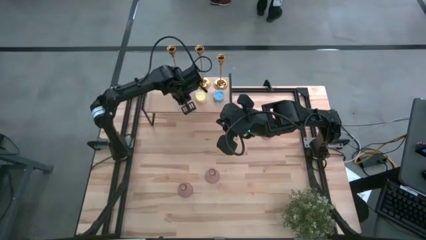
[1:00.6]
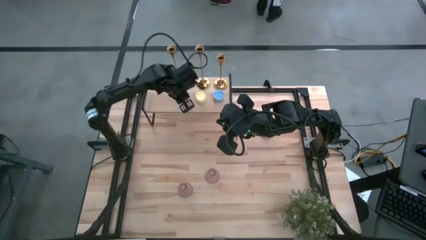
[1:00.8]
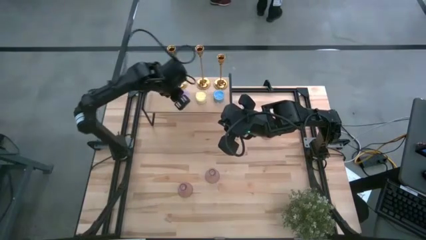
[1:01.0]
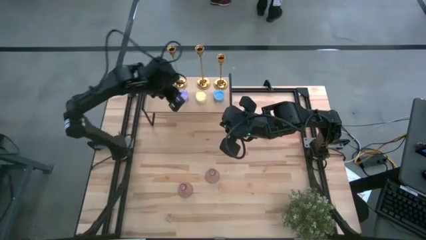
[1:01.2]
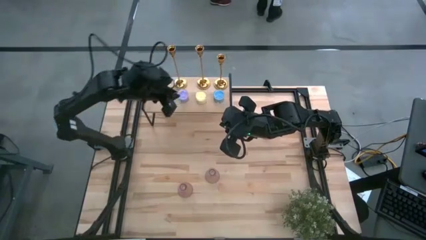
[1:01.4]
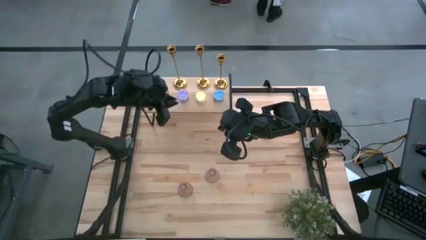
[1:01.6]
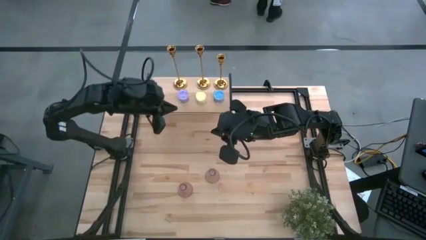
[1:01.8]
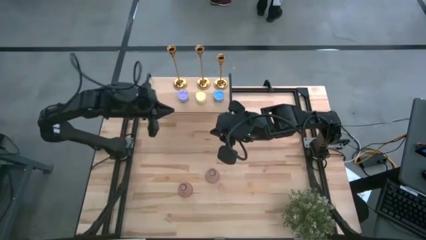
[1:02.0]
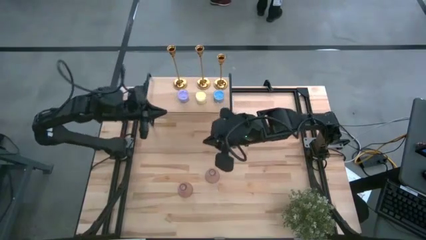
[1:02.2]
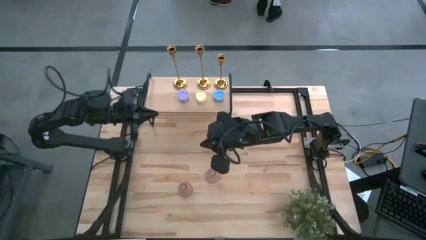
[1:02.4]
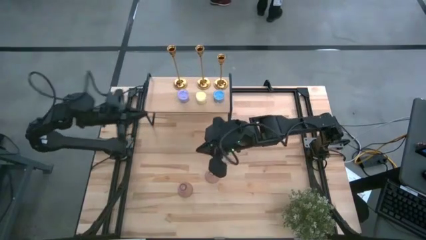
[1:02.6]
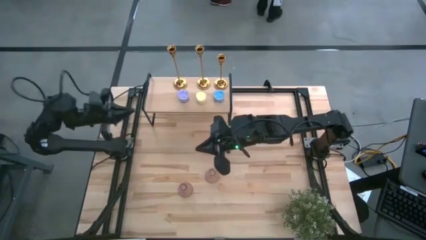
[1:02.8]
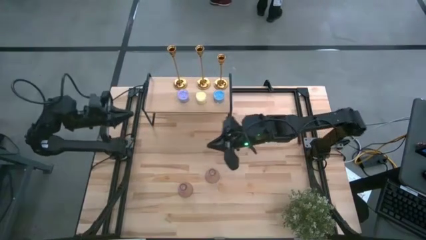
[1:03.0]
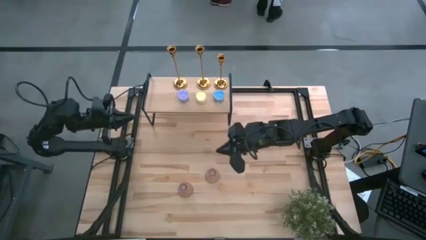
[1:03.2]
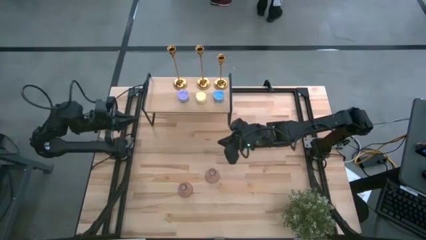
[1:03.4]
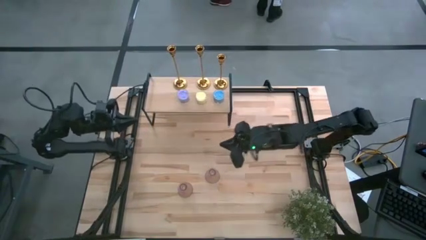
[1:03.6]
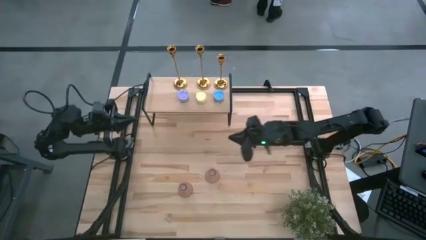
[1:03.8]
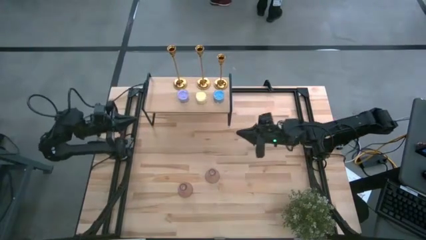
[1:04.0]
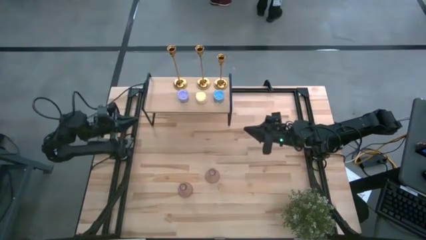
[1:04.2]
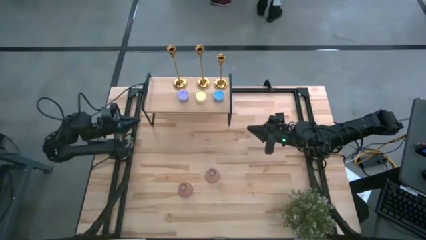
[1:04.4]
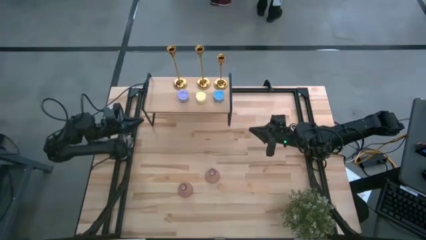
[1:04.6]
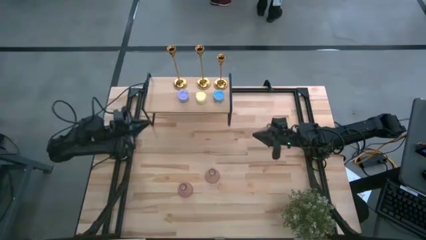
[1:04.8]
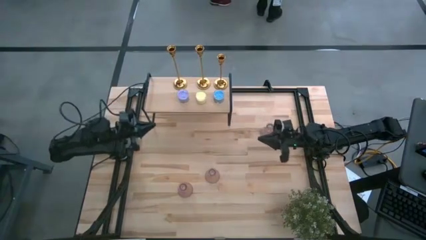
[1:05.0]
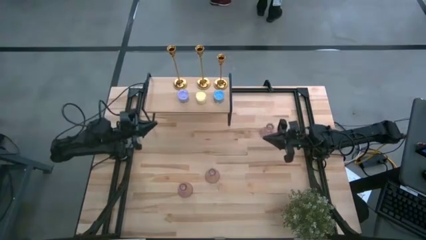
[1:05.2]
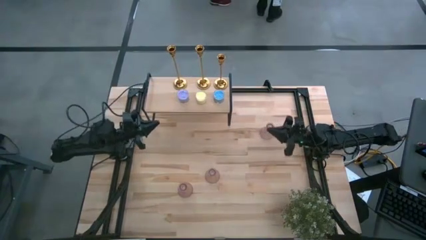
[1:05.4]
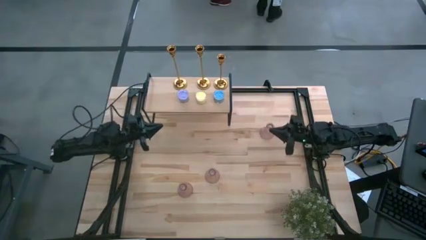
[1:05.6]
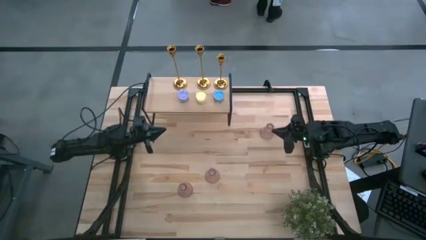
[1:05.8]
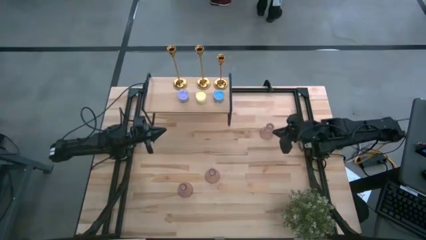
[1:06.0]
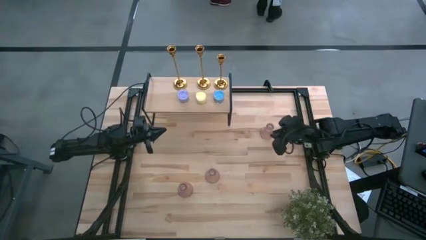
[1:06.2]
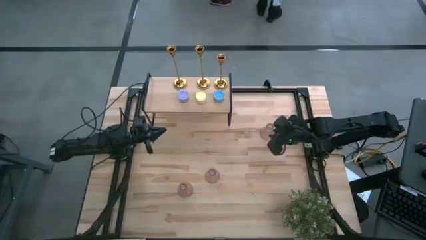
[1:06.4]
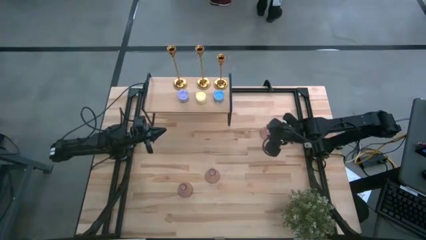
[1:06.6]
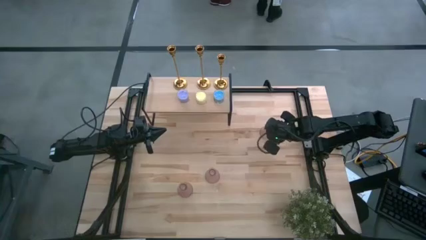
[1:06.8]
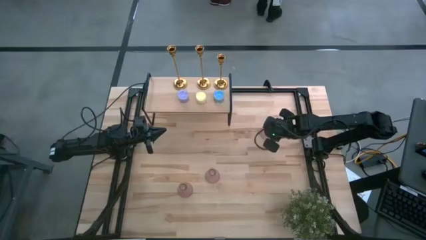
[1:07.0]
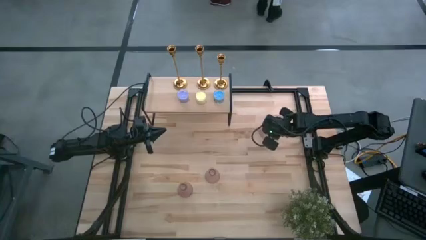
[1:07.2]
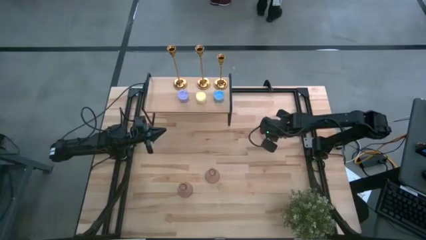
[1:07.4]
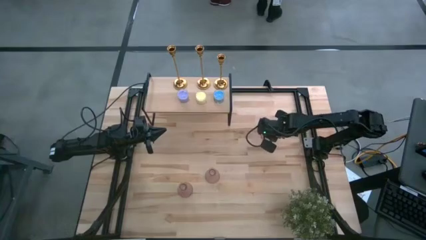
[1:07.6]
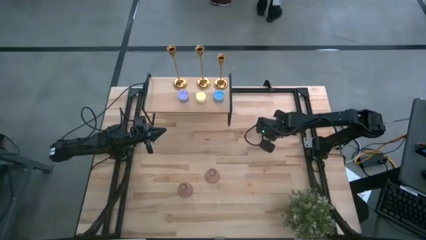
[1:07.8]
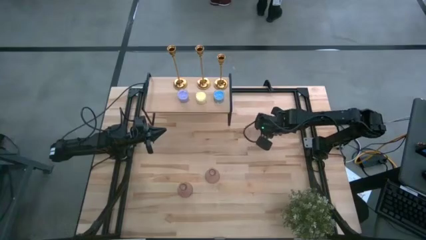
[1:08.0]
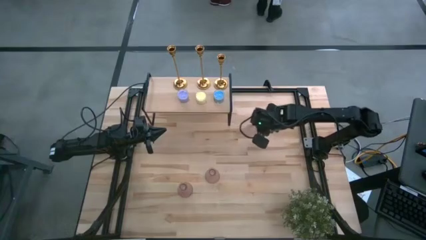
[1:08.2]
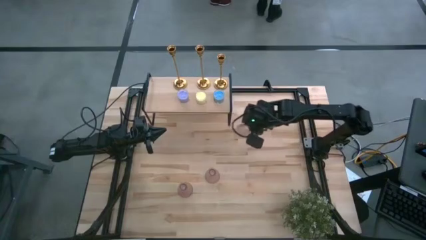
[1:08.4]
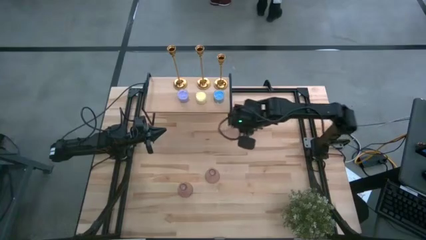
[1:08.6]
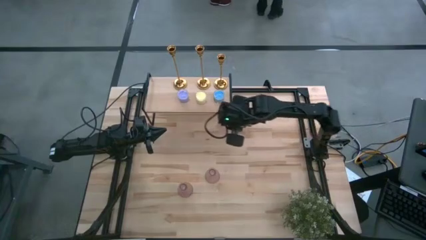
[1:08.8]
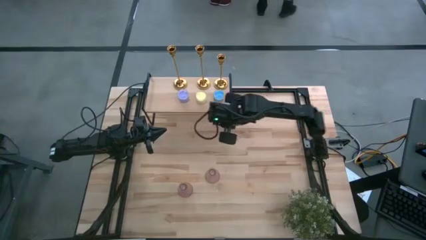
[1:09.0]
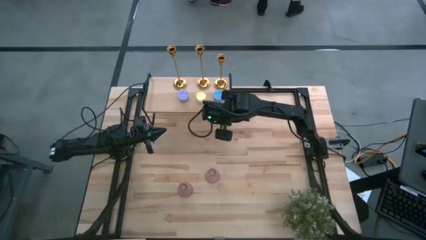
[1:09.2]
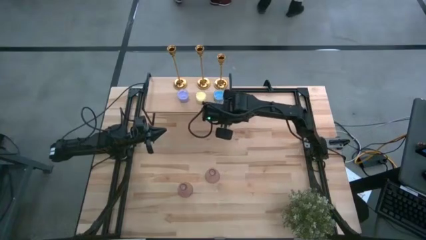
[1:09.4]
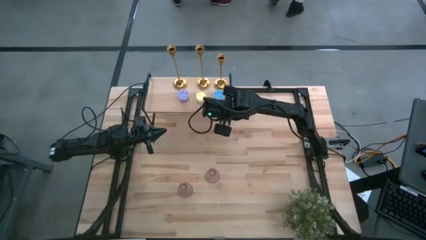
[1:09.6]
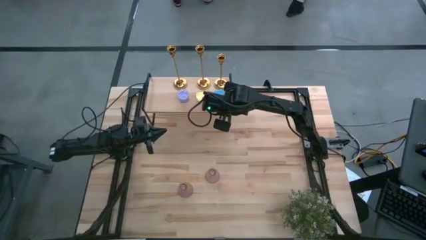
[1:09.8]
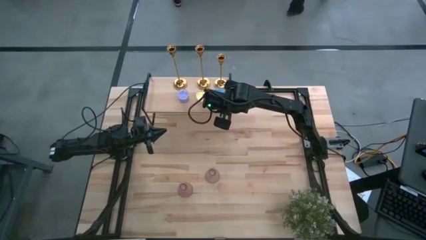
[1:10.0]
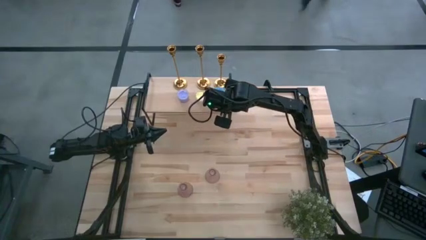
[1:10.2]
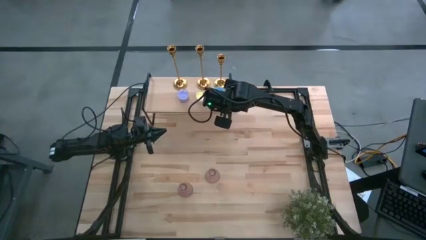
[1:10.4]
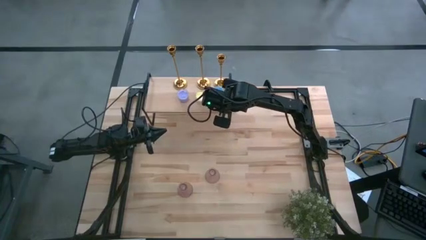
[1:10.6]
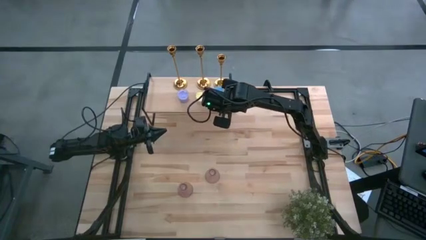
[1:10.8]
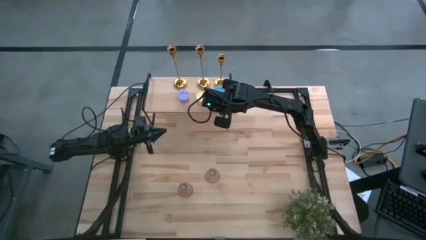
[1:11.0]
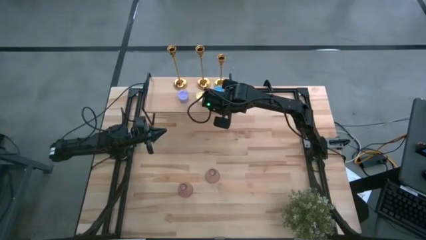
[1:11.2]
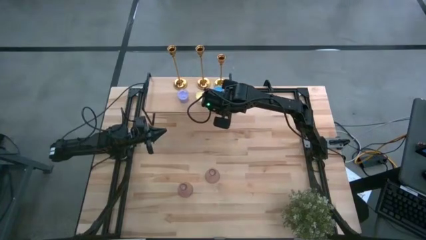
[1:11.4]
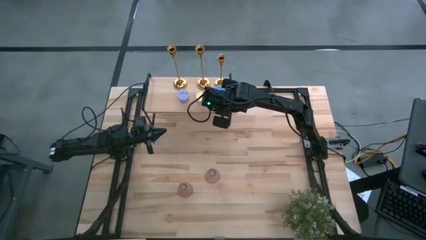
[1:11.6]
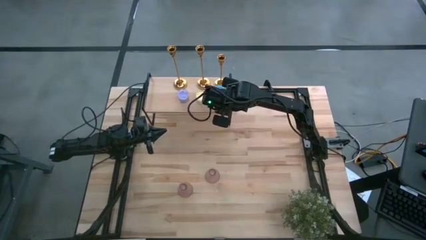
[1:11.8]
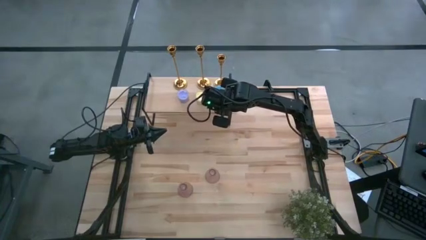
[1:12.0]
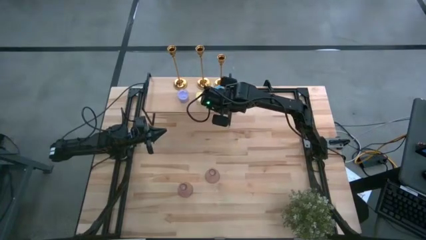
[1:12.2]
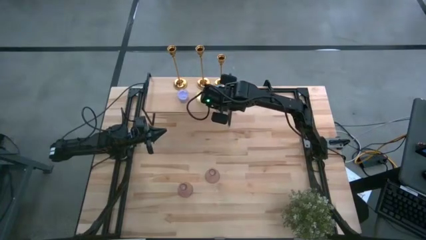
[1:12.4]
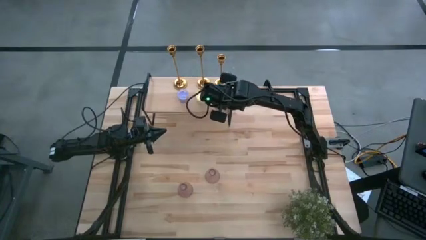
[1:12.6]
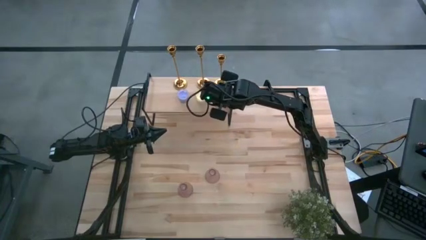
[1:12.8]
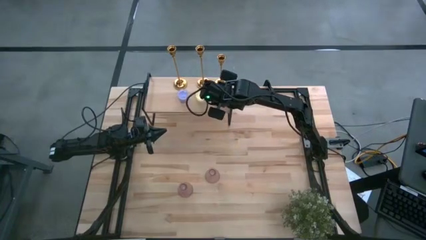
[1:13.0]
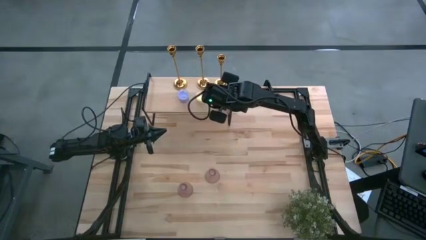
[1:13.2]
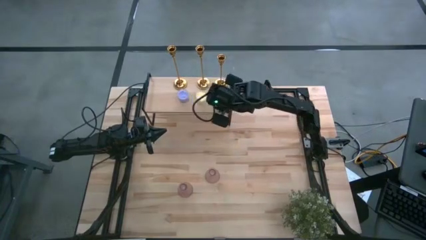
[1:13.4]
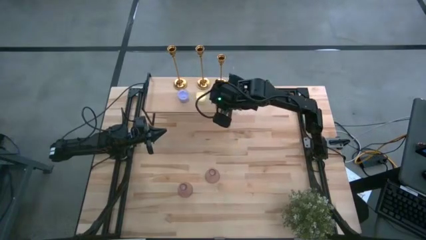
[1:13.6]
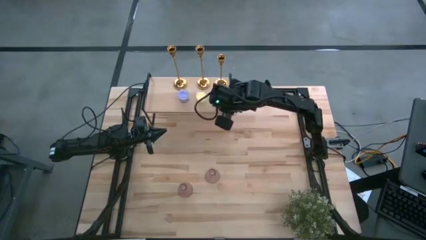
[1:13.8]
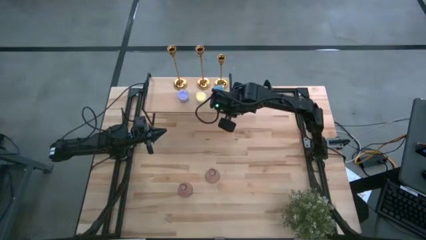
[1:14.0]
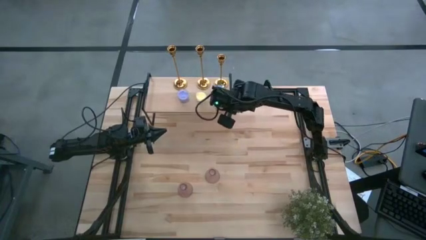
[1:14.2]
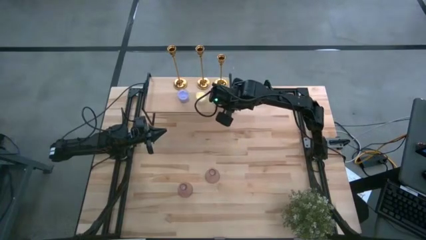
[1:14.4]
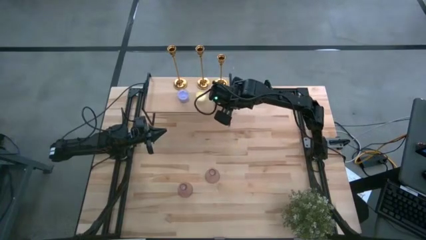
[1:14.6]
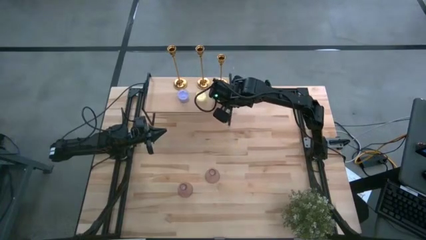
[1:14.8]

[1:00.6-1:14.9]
Task: Pick & Place candle stick holders
Put the top pink candle holder on the shelf
